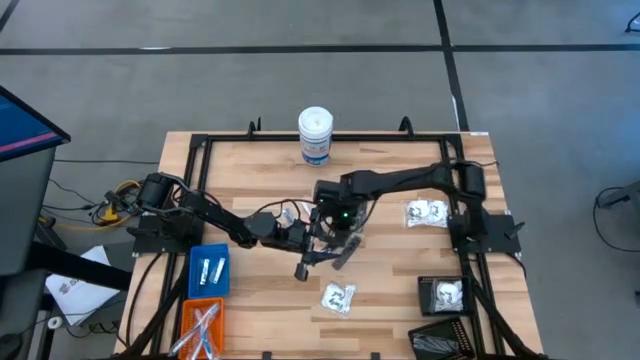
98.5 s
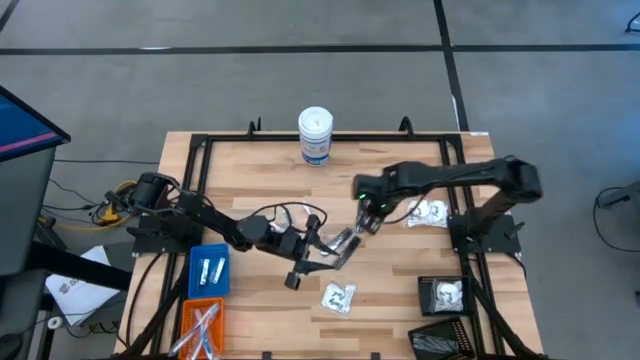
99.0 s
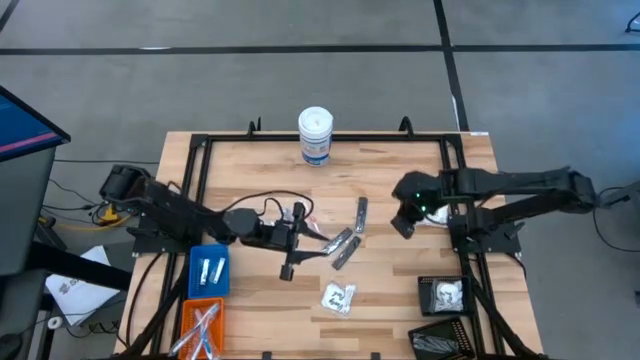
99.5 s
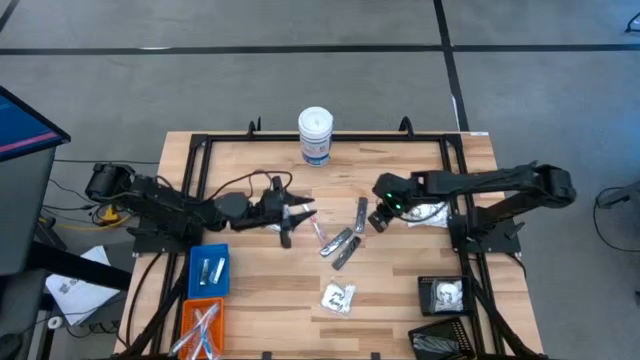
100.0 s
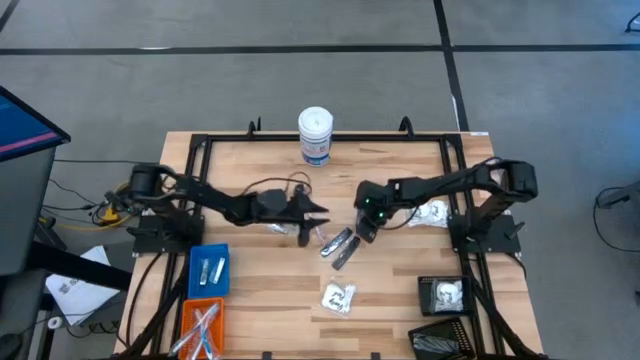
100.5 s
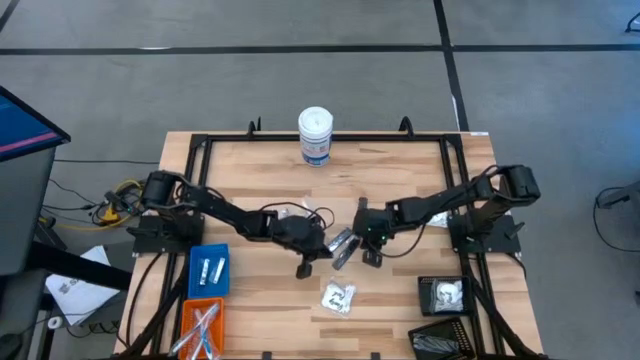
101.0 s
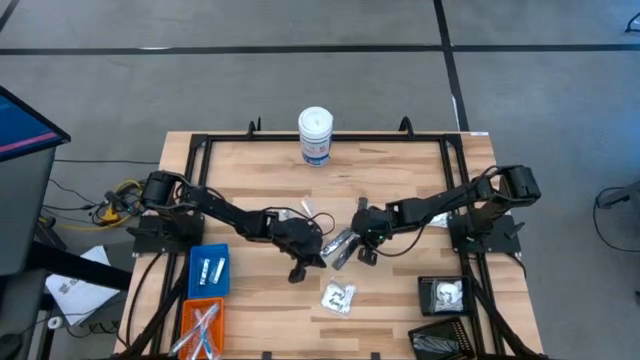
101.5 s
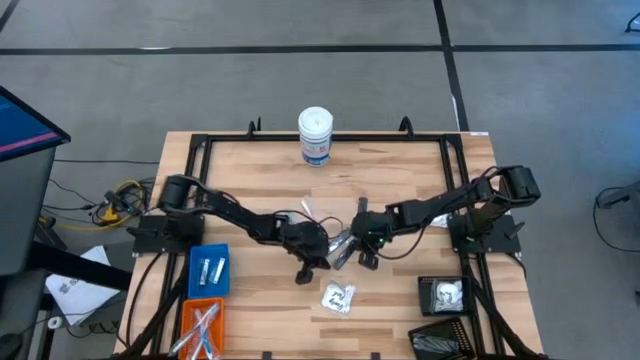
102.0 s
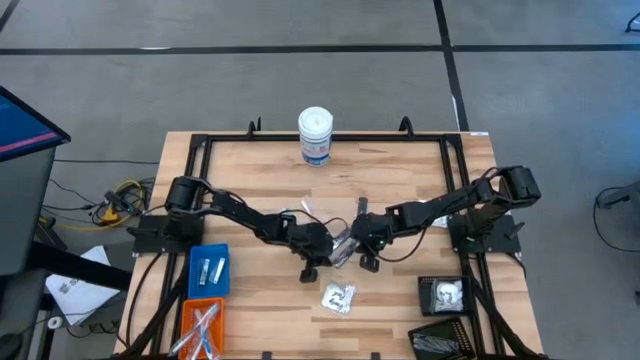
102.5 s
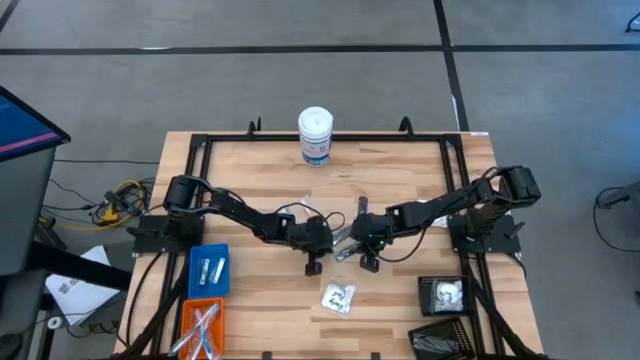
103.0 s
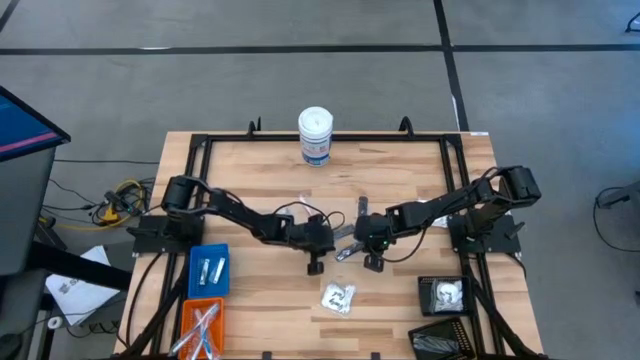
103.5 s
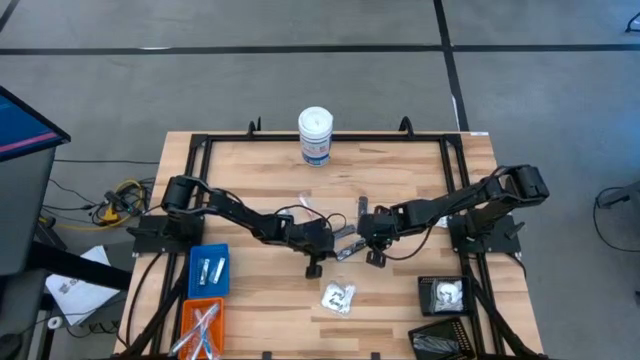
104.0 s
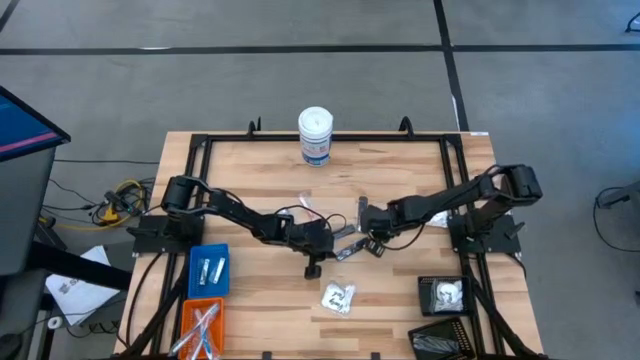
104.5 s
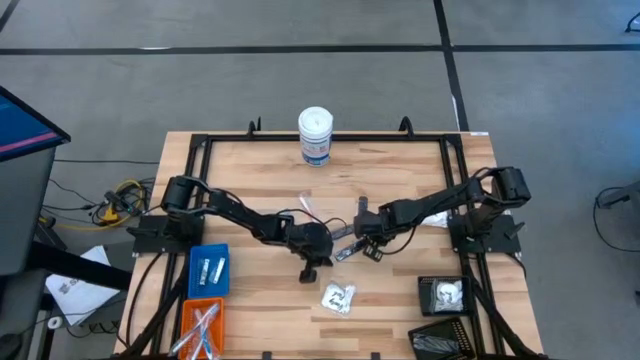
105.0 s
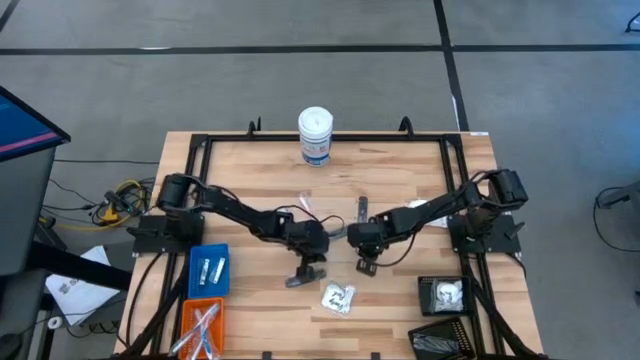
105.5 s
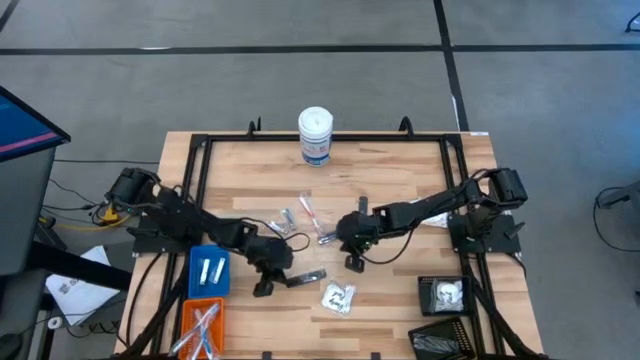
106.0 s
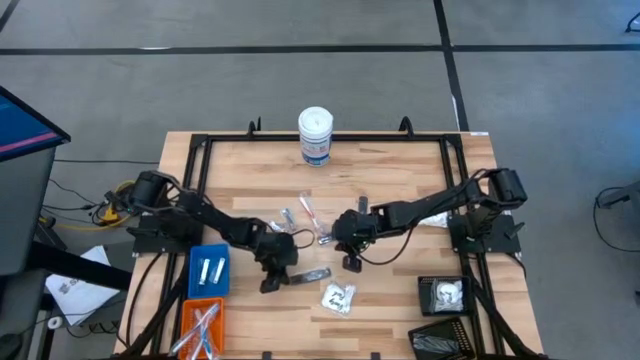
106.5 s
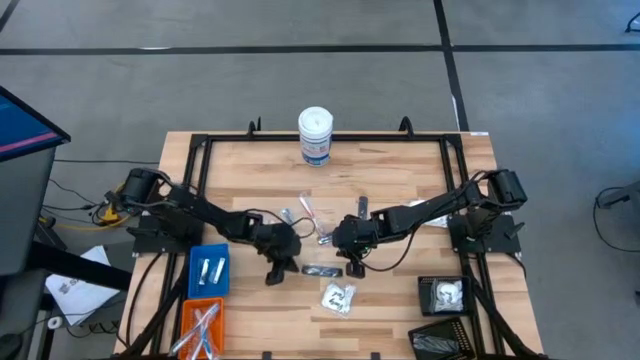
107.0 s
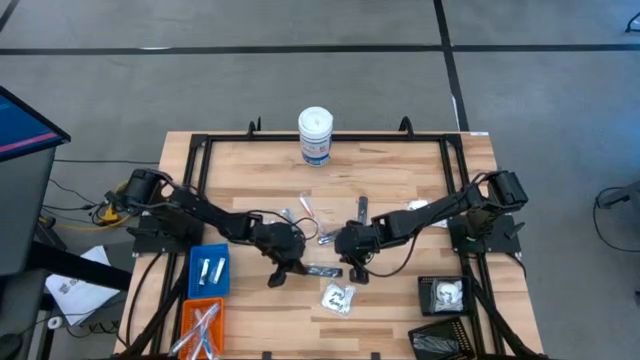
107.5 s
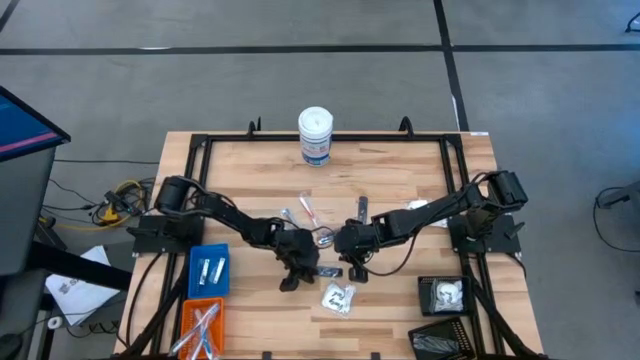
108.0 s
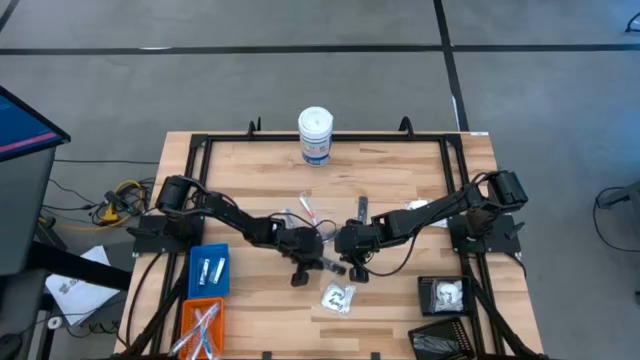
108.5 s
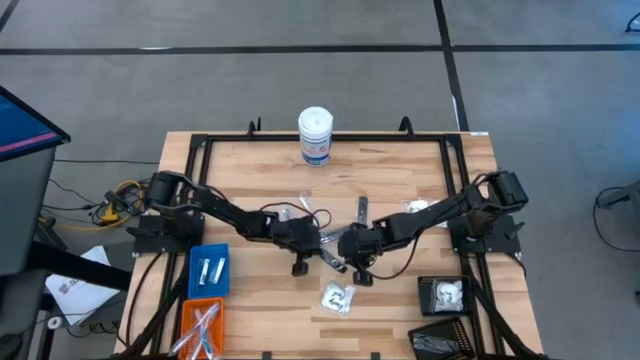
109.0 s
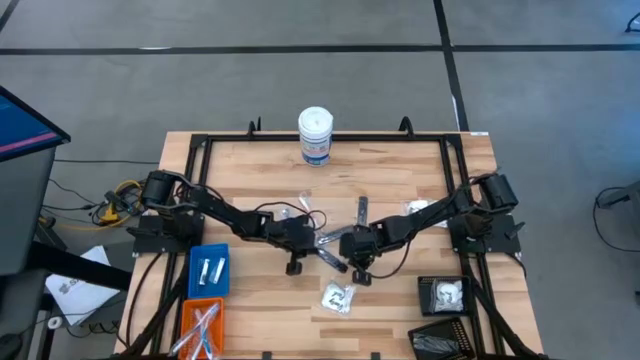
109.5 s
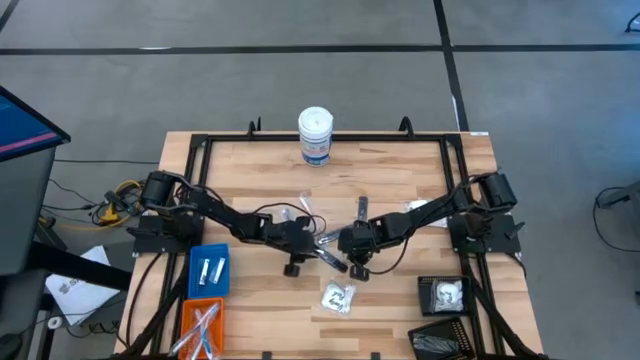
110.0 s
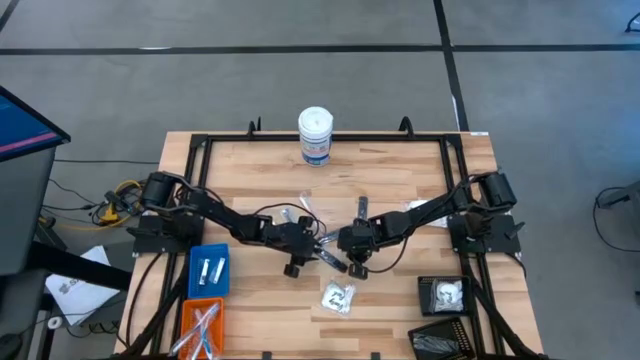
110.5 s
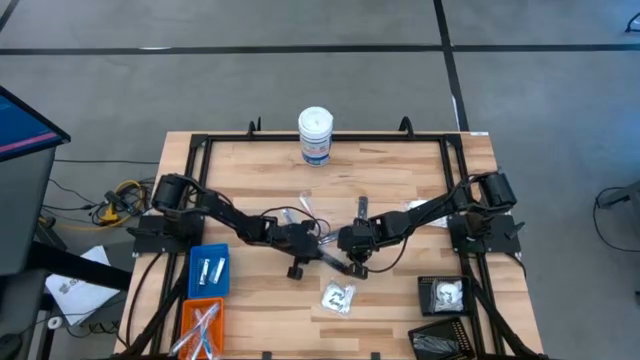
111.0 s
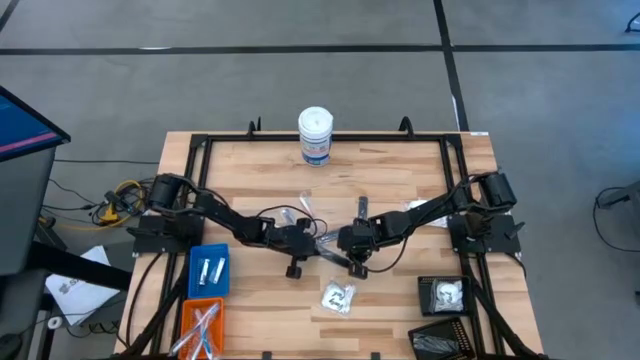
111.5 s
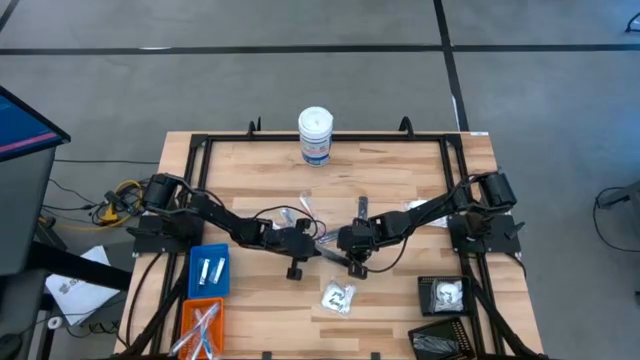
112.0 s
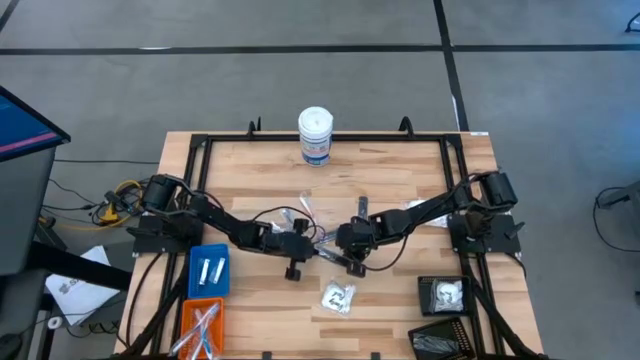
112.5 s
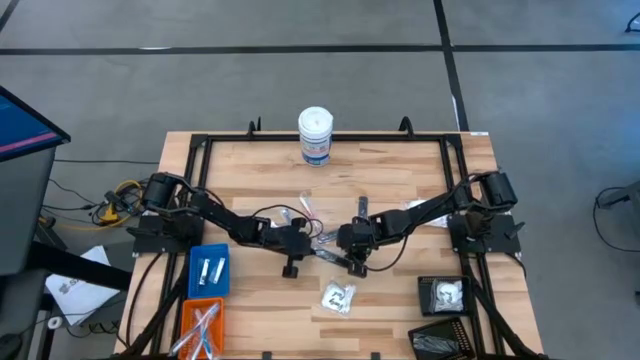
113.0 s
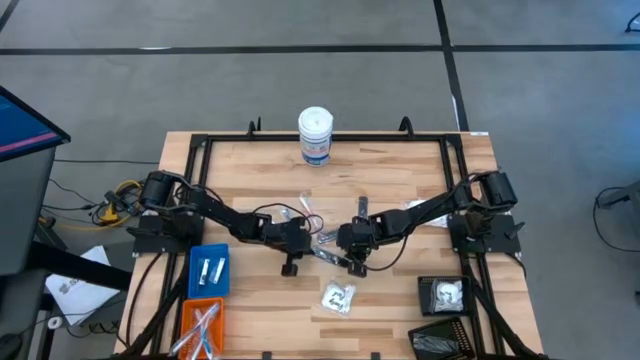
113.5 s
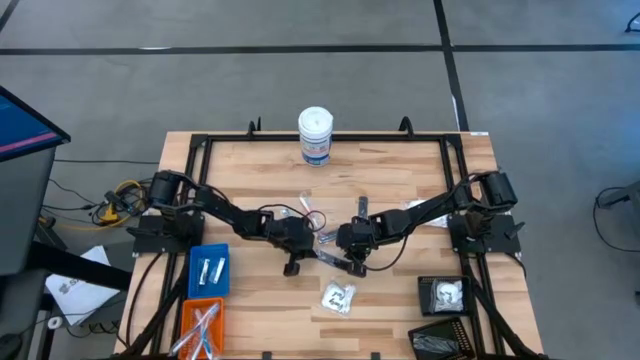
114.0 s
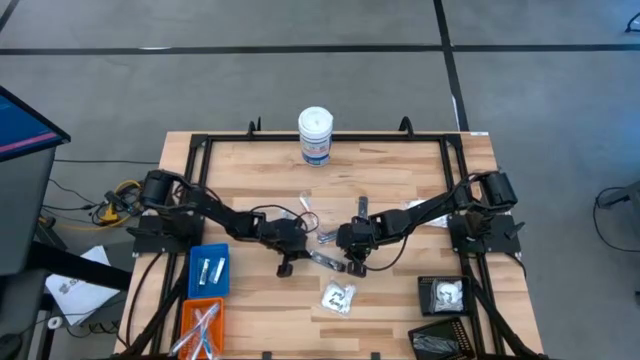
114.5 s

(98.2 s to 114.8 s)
Task: Pick & Place Travel size toiletries
Put the black comb into the bottom black bin

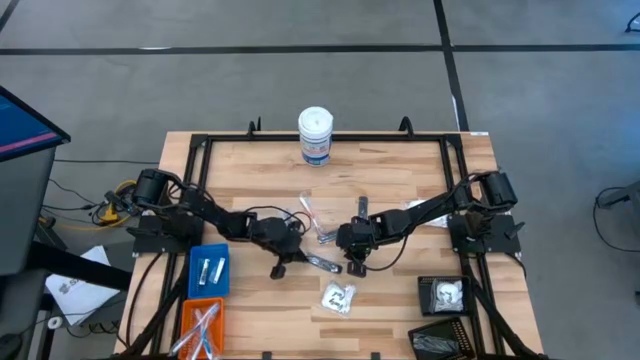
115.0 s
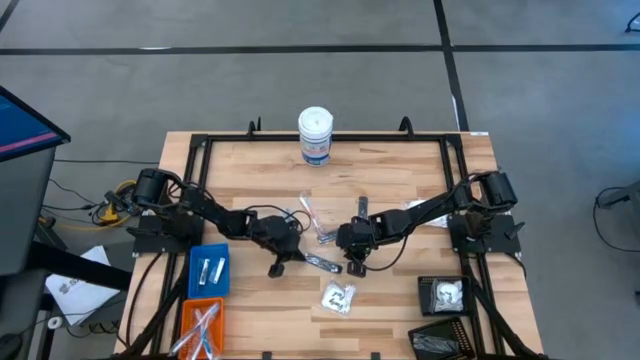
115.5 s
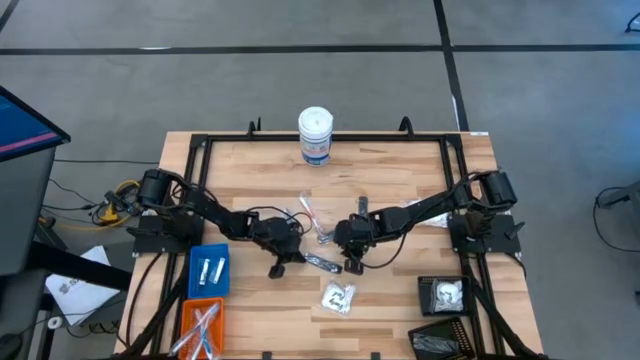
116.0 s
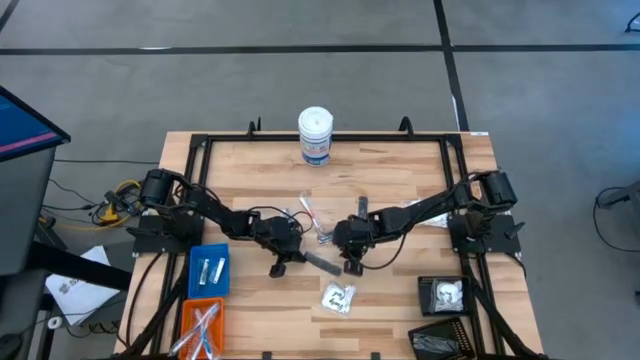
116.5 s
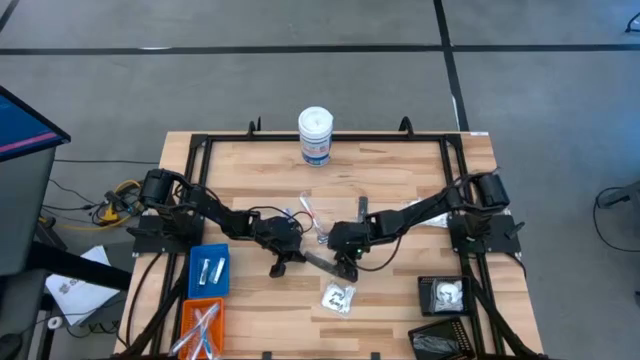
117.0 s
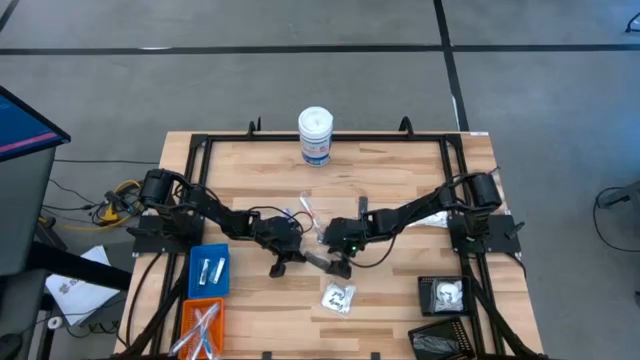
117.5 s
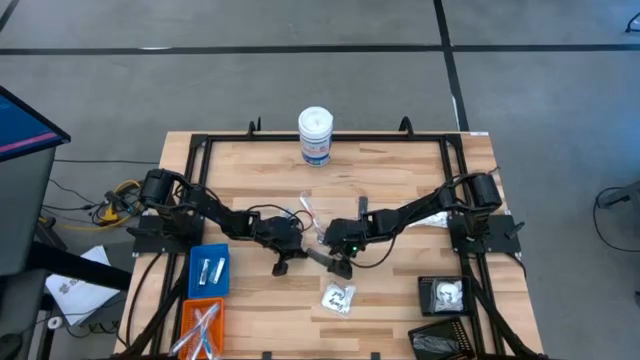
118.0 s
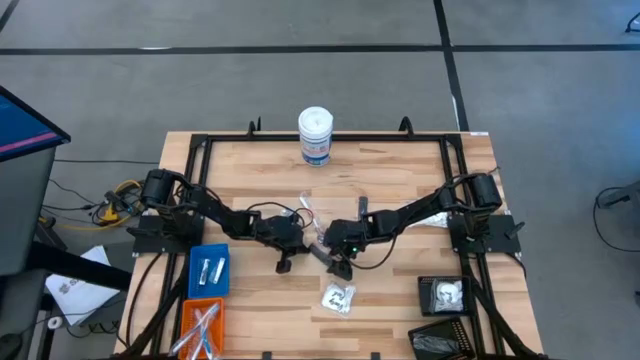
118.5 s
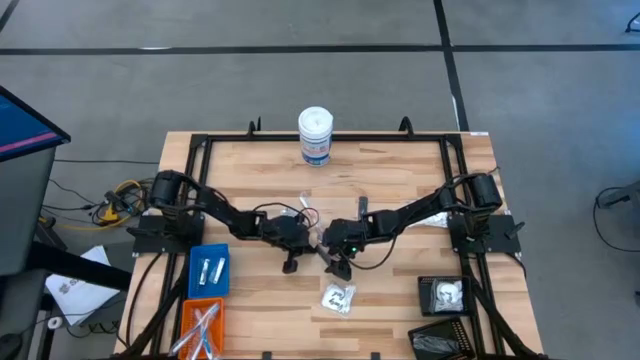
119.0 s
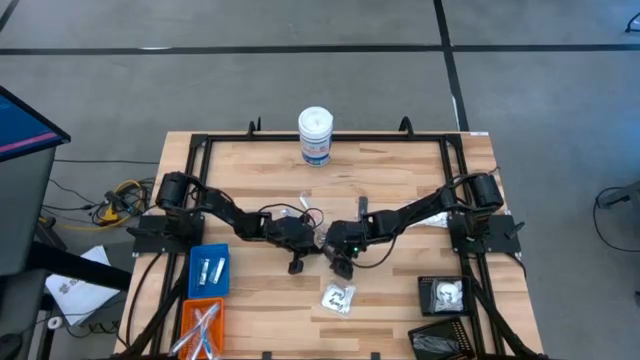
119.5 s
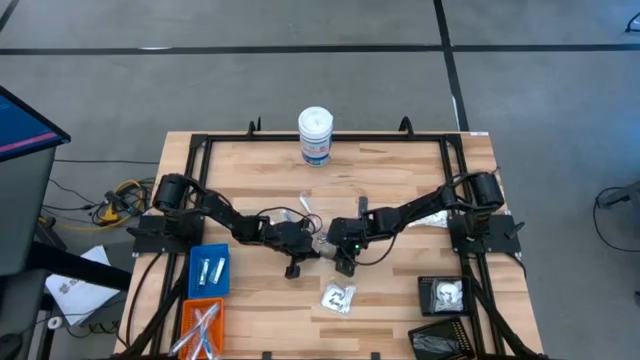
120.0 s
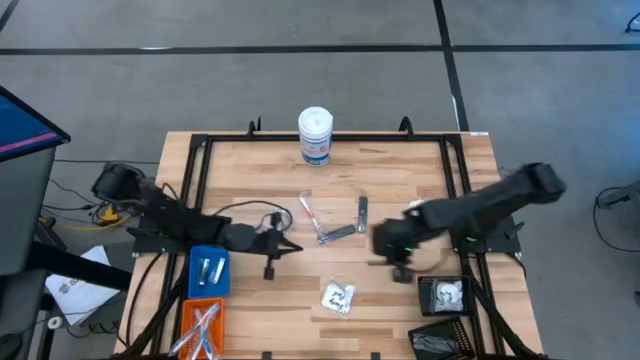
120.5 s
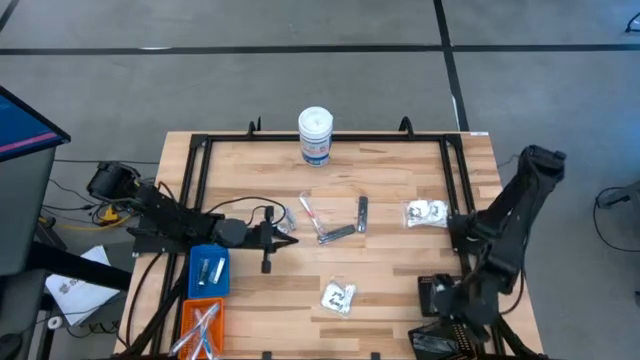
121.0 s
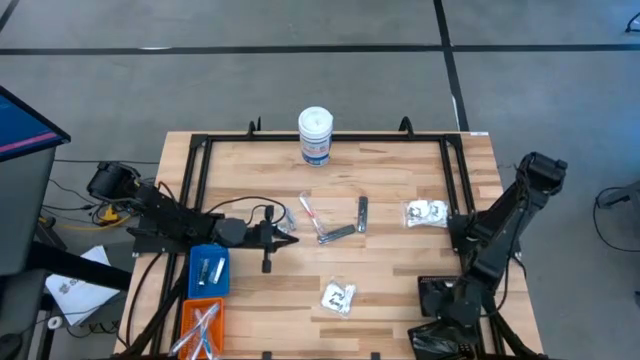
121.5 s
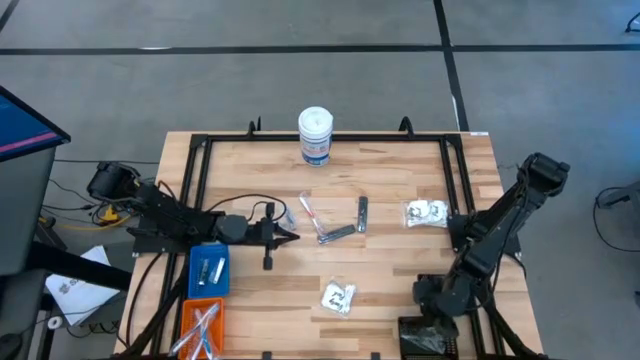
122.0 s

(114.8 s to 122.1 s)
Put the black comb into the bottom black bin
